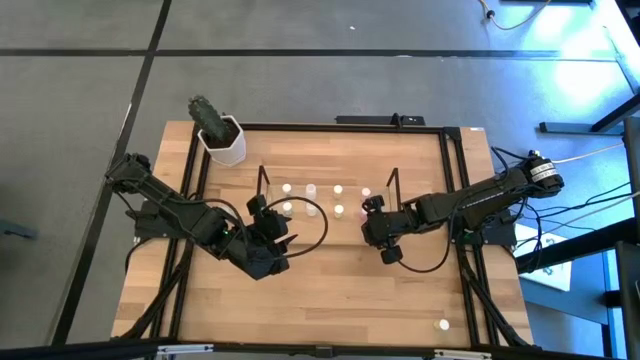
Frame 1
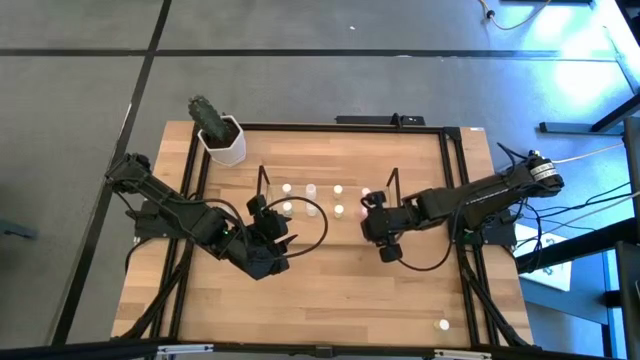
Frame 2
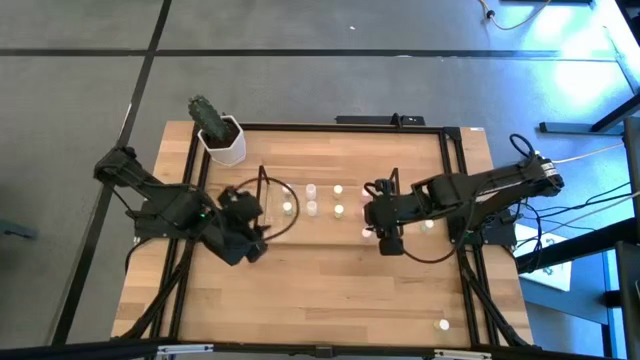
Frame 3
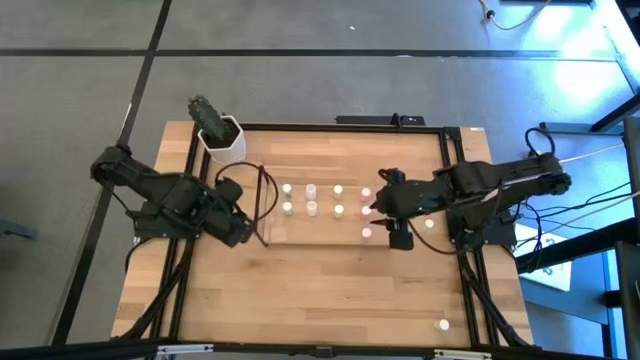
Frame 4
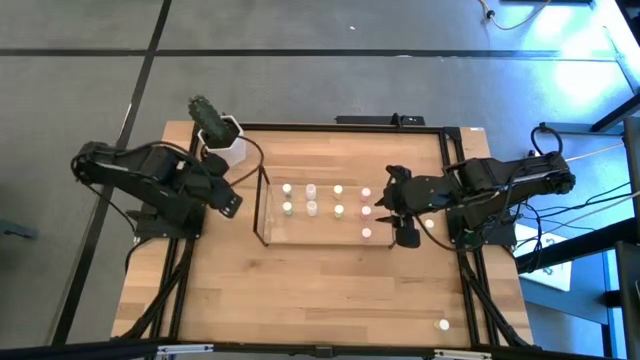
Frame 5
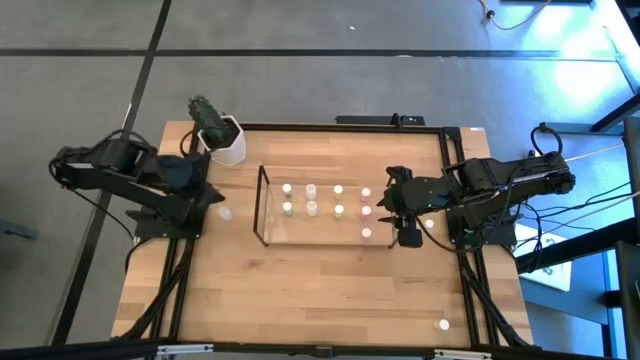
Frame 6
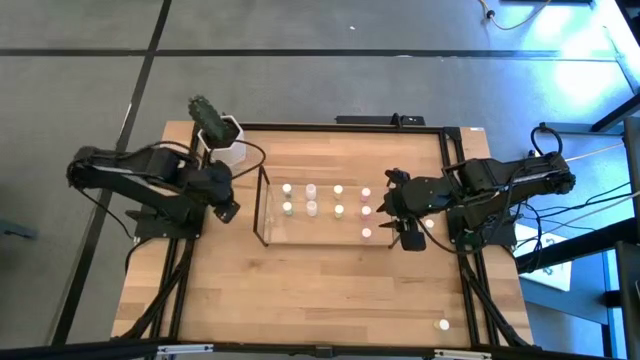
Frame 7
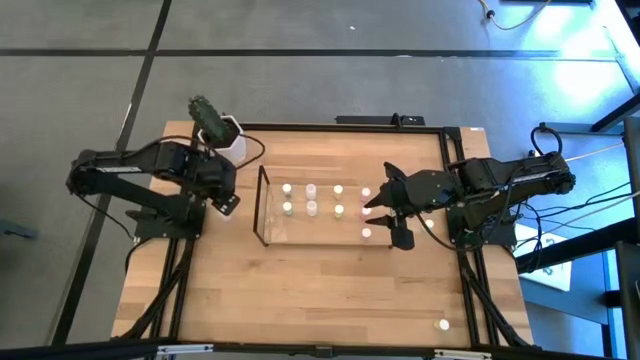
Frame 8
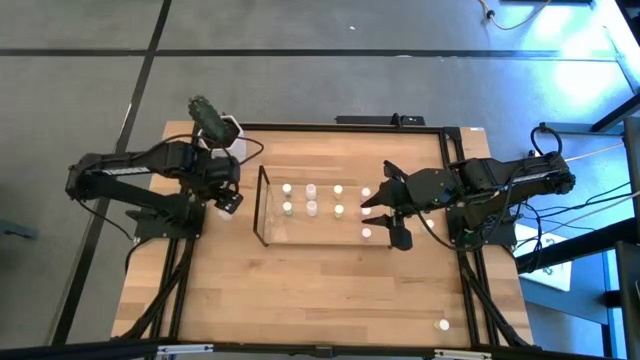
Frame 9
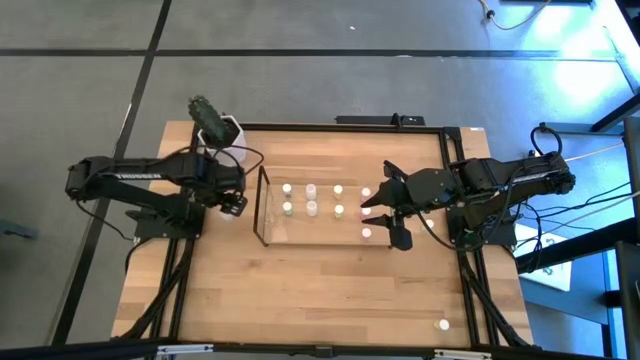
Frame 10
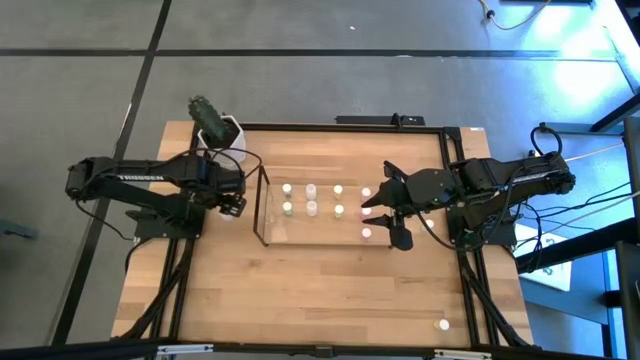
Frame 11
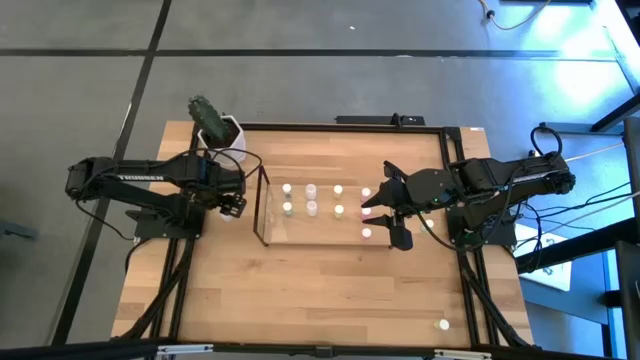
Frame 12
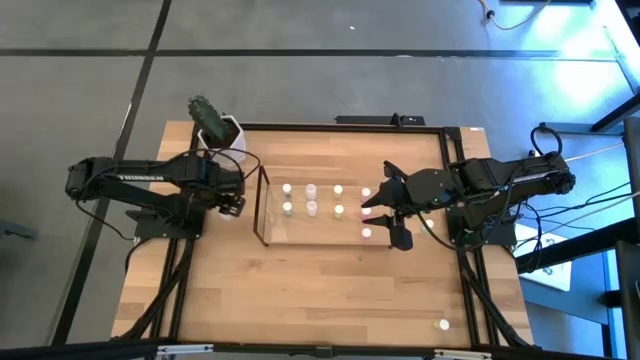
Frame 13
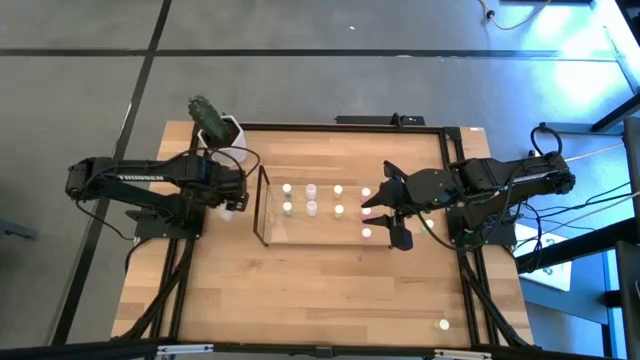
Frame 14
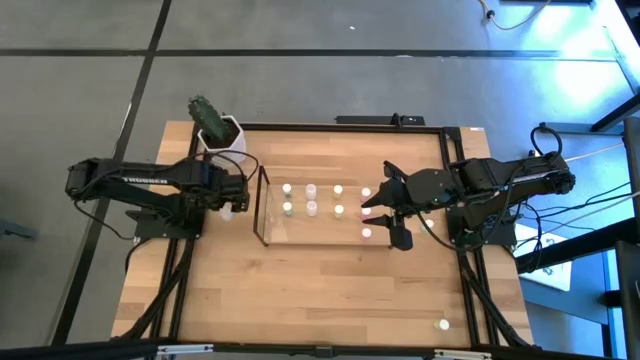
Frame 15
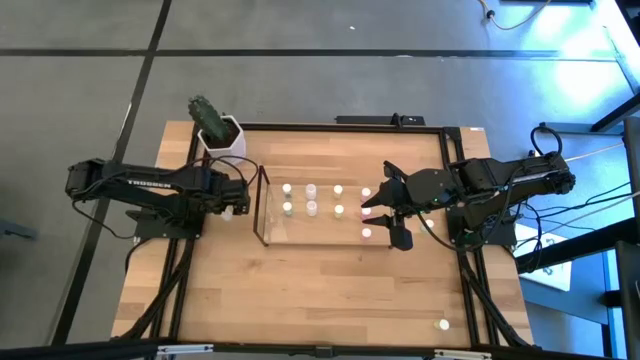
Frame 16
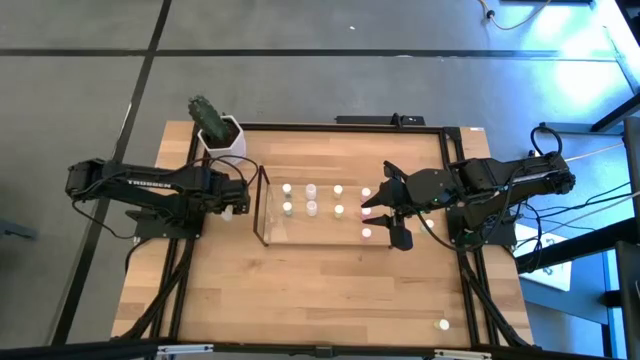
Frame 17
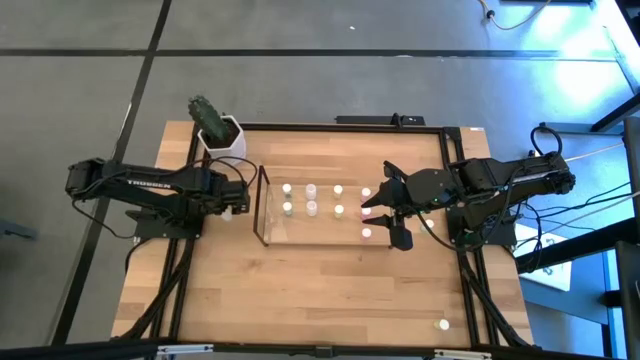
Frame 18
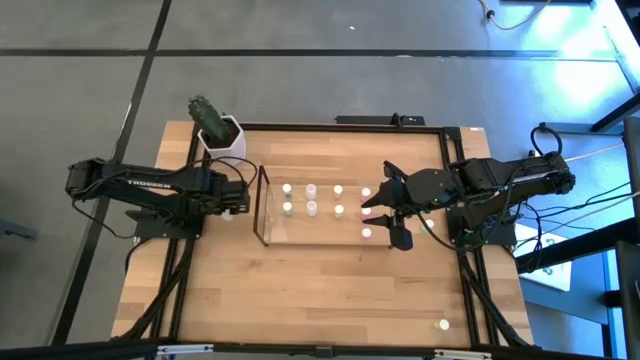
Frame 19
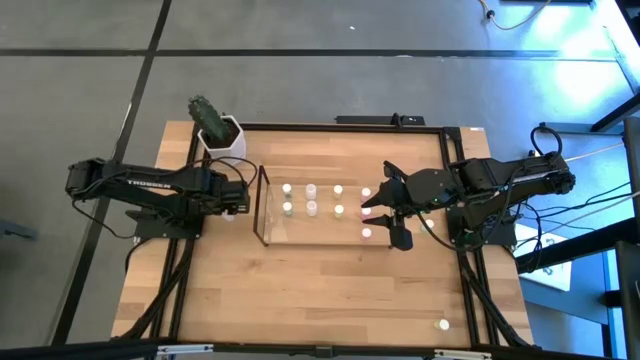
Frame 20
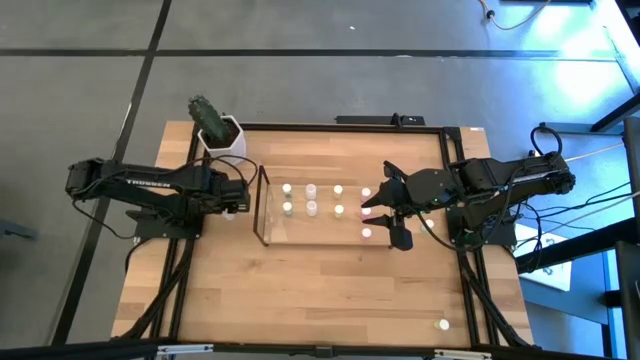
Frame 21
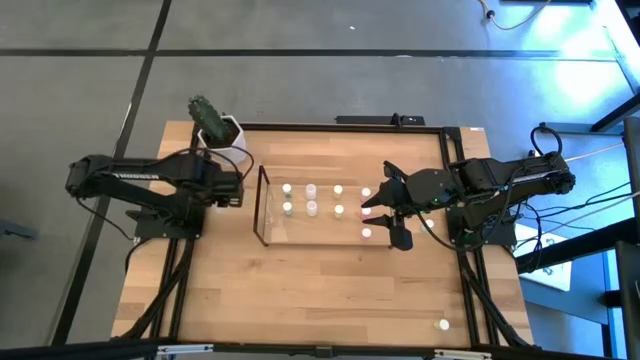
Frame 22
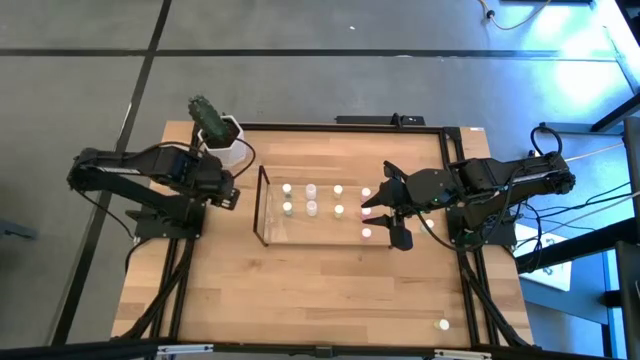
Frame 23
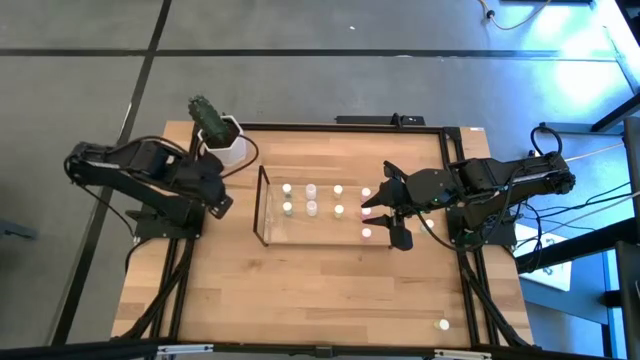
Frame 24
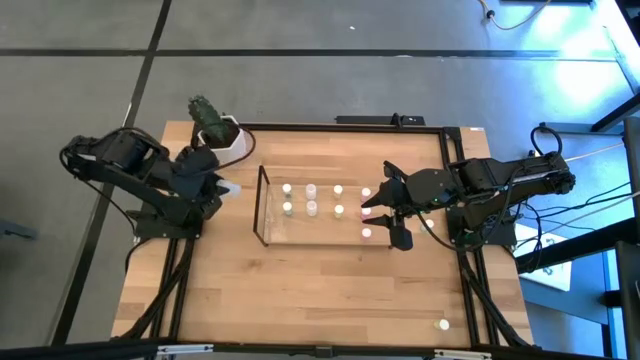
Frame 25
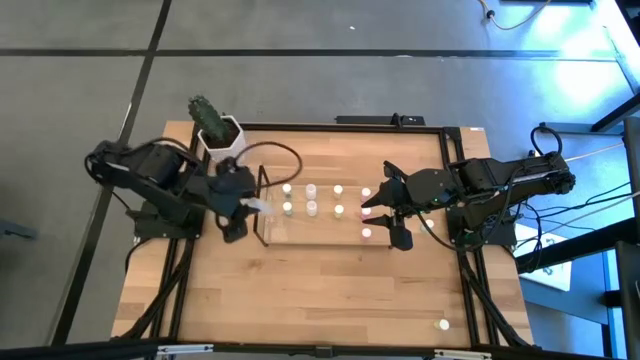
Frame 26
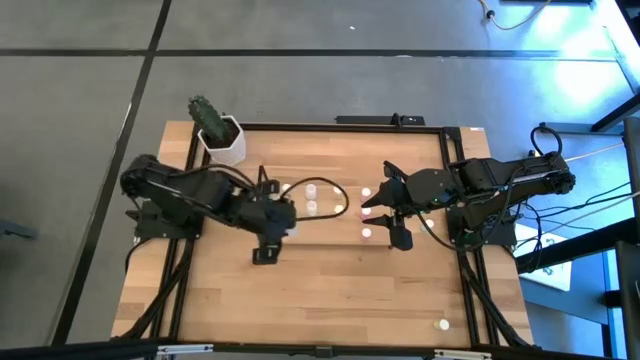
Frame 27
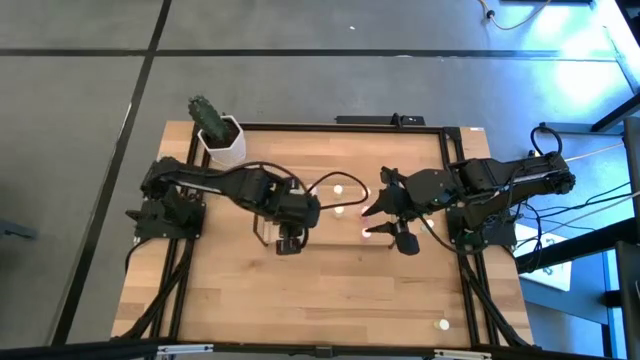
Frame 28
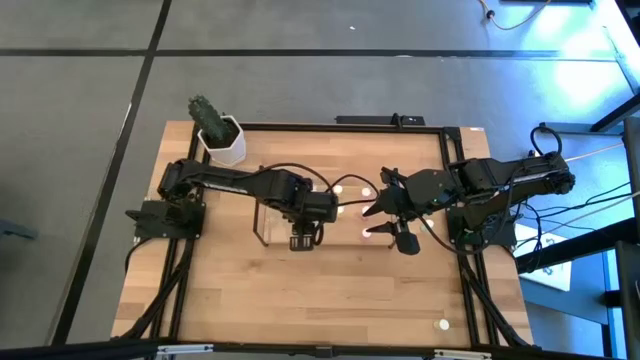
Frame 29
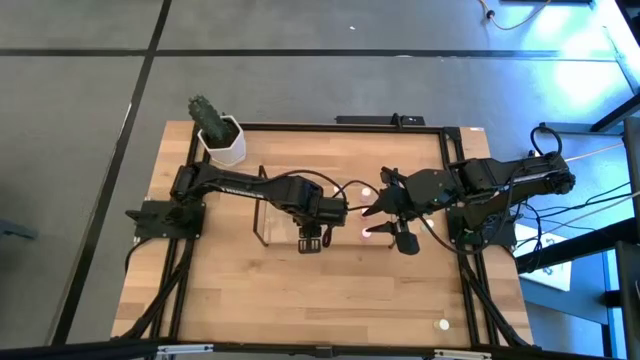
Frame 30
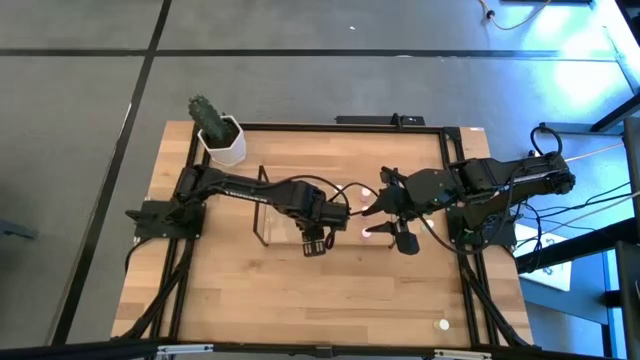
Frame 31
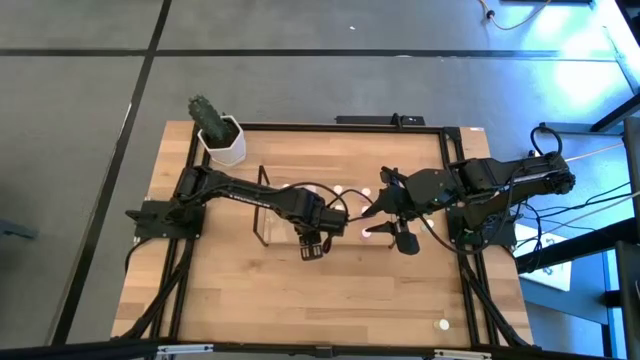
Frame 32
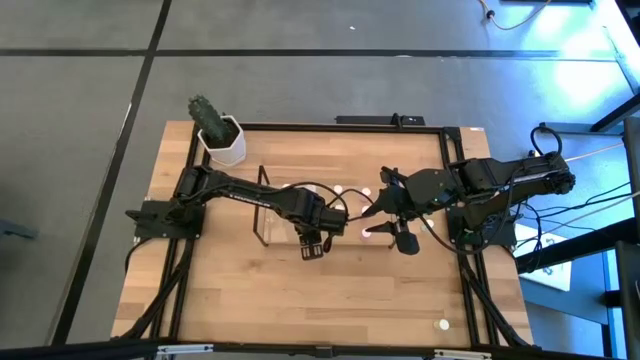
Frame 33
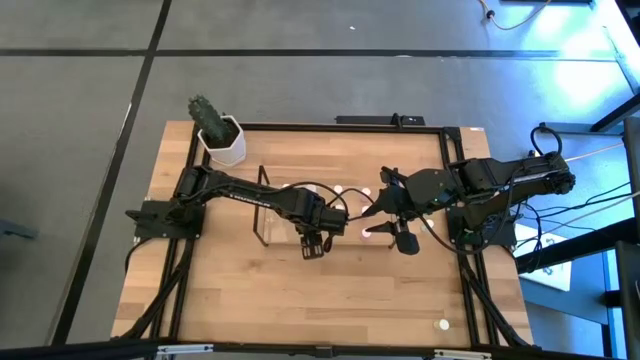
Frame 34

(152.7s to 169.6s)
Task: Pick and place medicine bottles onto shelf by color
Put the white pill bottle aligned with the other white pill bottles on the shelf

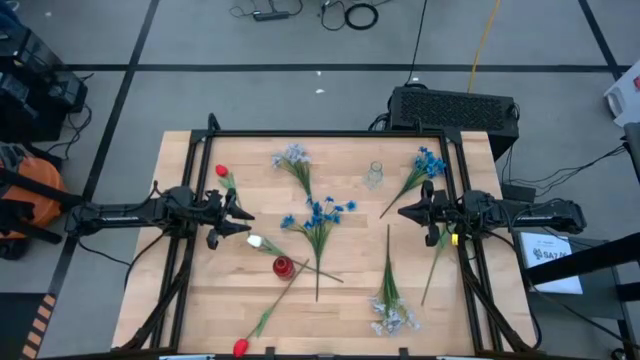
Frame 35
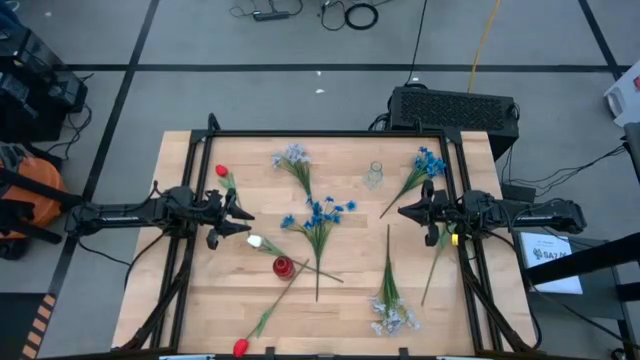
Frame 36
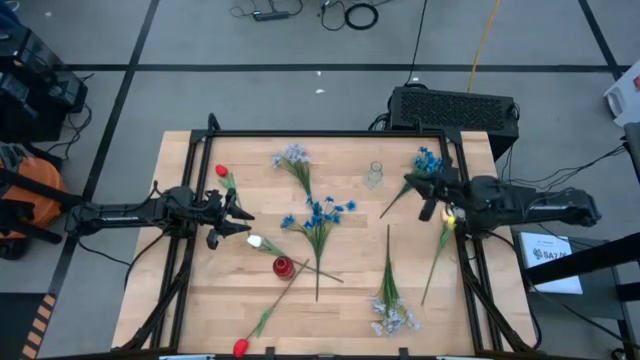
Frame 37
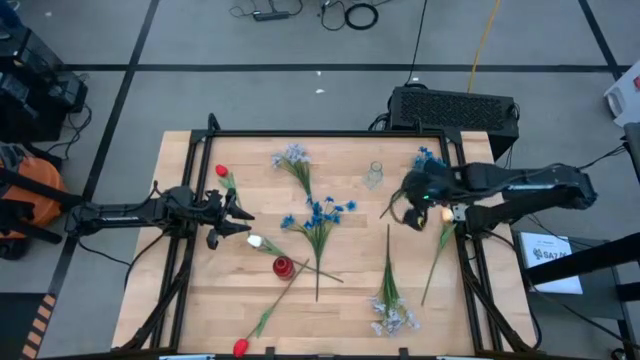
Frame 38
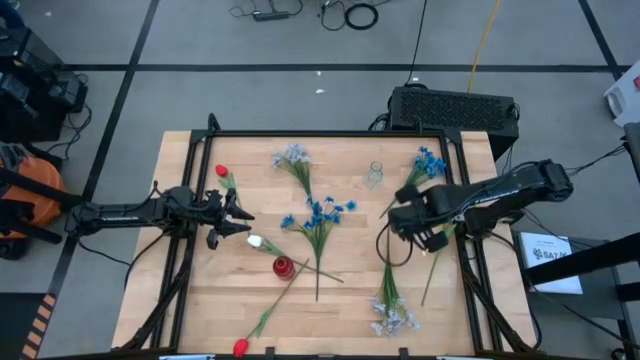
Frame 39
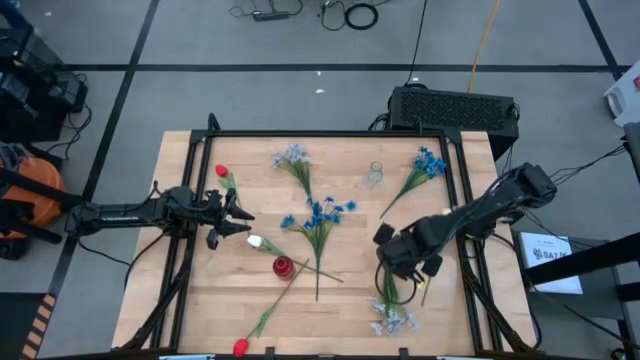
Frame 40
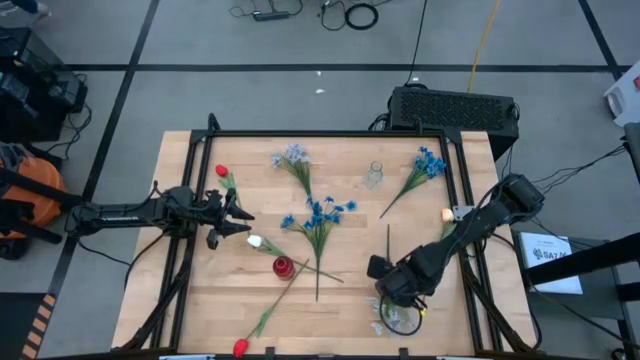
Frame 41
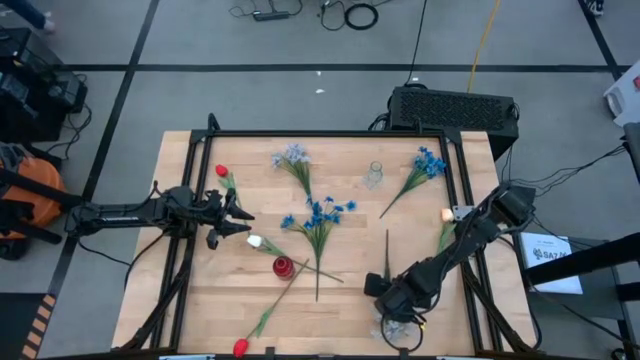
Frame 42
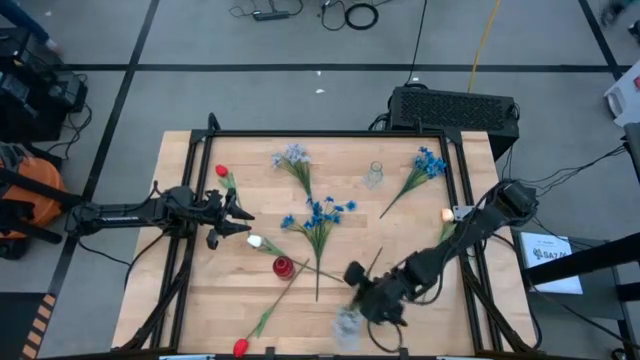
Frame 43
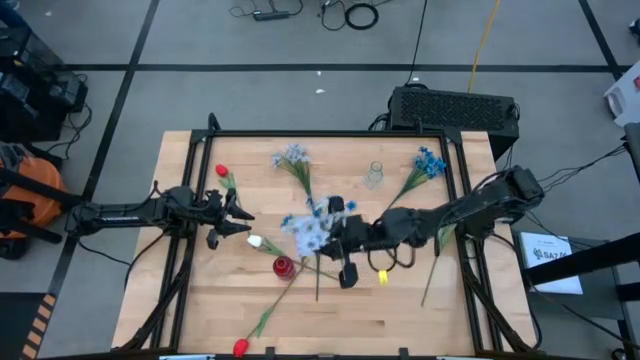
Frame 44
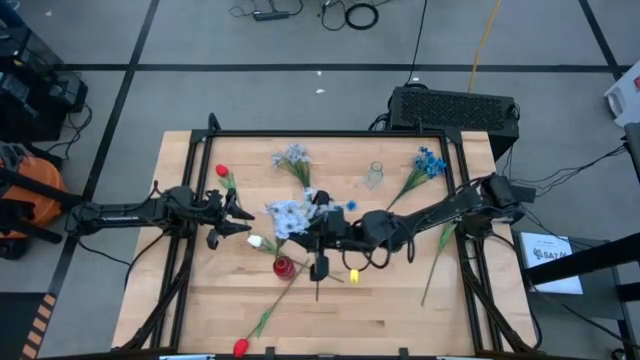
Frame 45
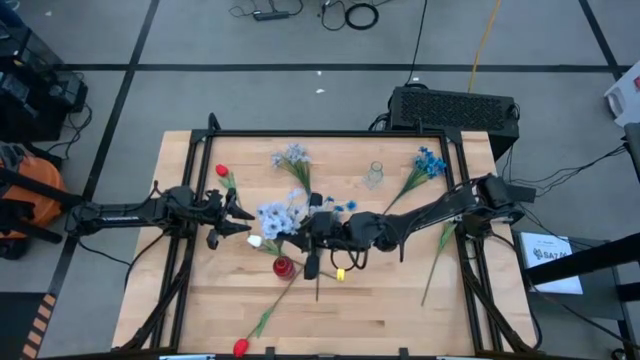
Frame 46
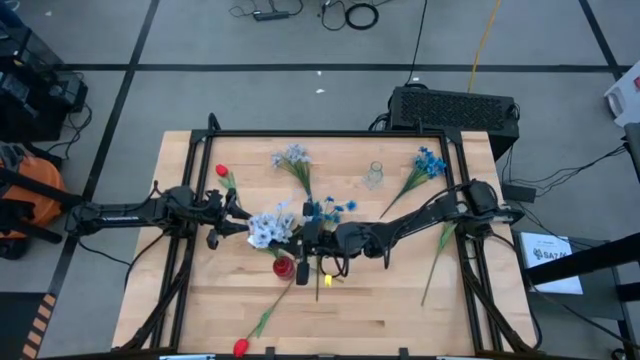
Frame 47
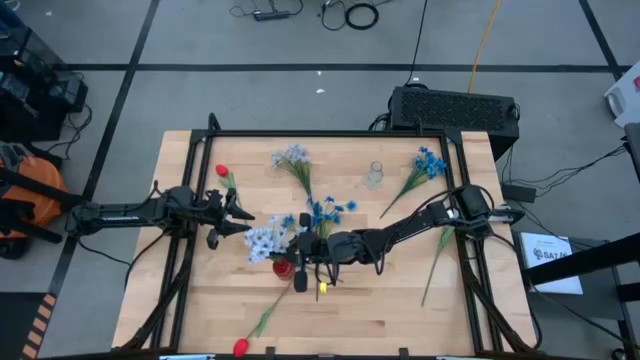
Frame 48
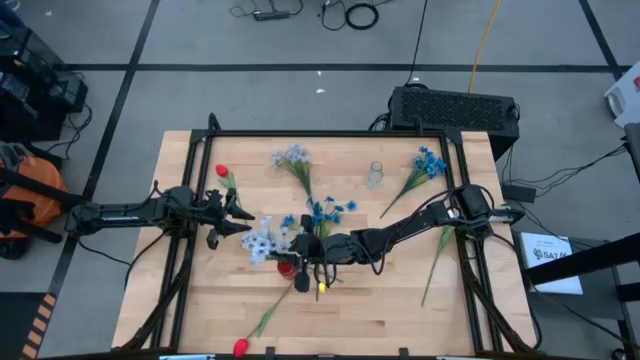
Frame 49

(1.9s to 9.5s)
Task: Sort flowers into vase by color
Put the bottom white flower into the red vase
